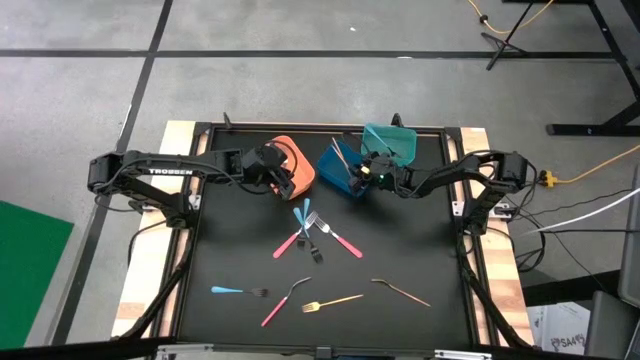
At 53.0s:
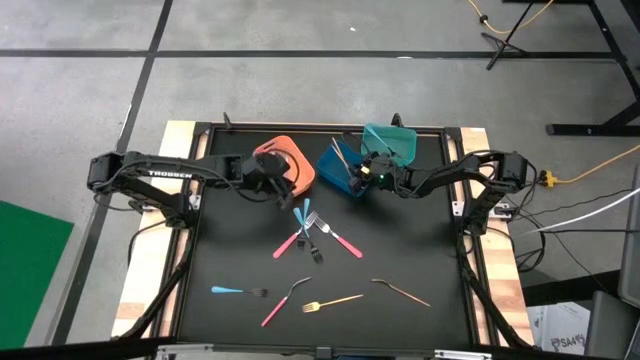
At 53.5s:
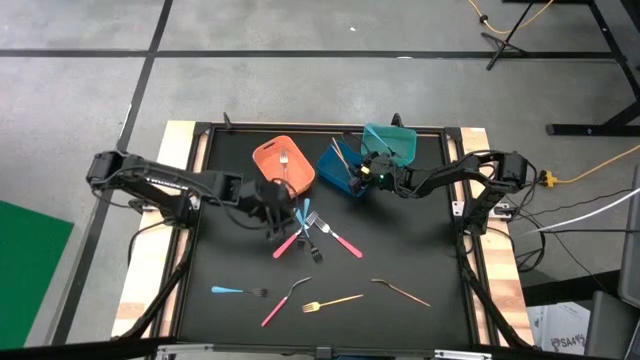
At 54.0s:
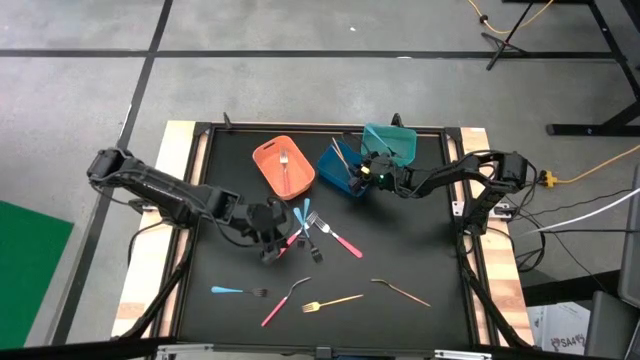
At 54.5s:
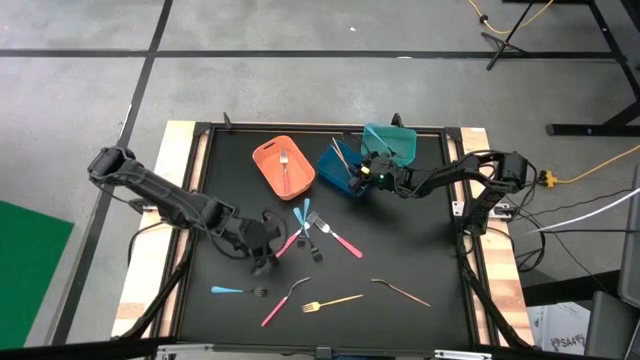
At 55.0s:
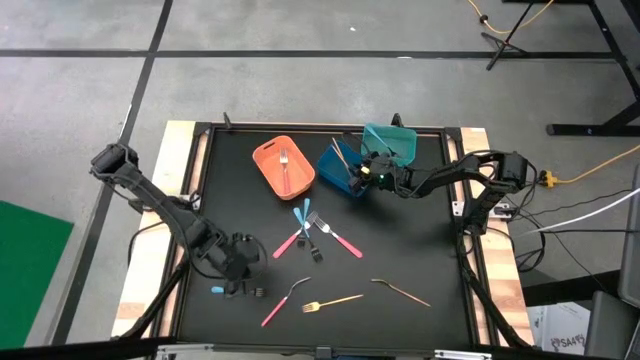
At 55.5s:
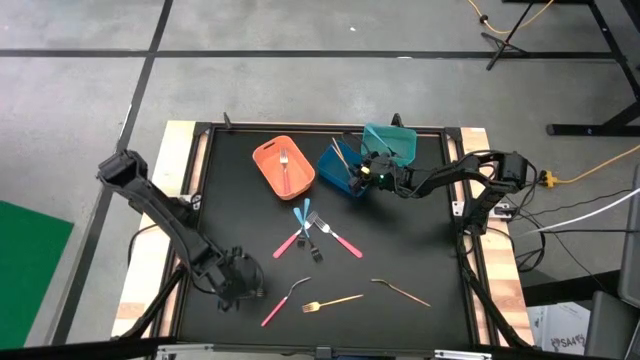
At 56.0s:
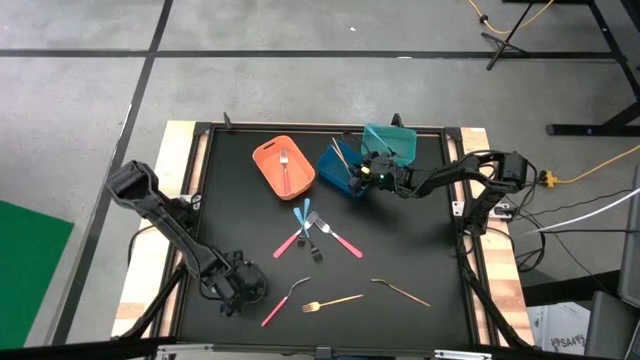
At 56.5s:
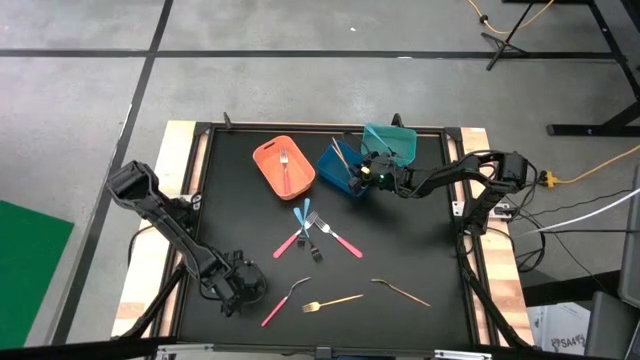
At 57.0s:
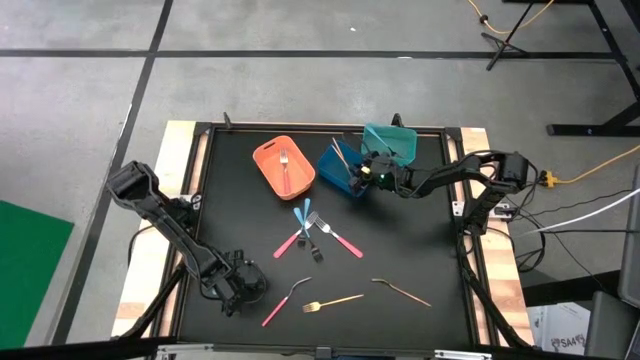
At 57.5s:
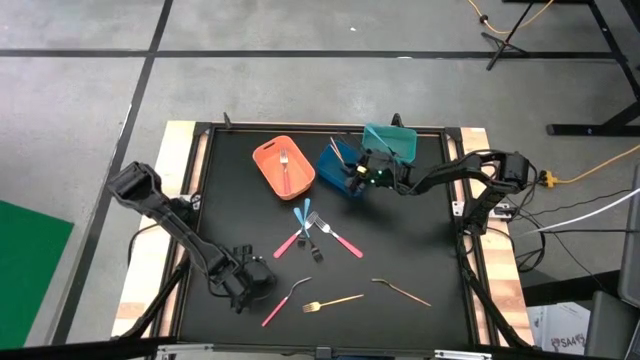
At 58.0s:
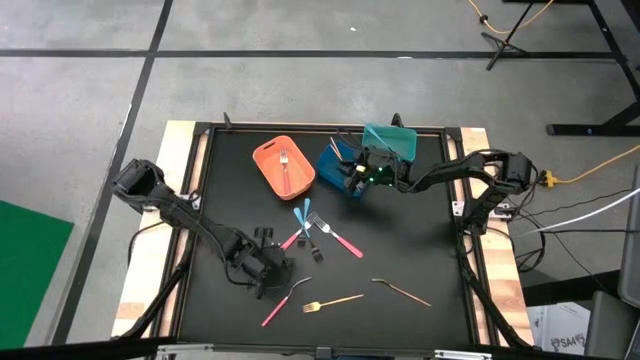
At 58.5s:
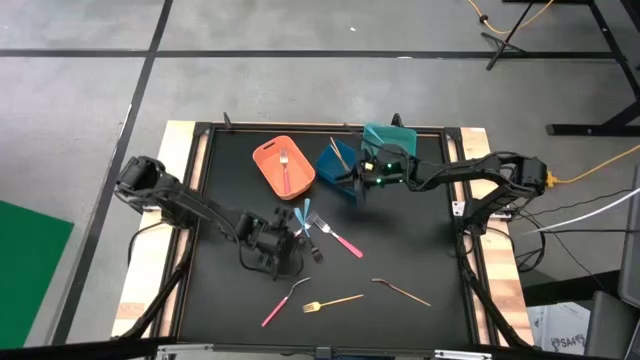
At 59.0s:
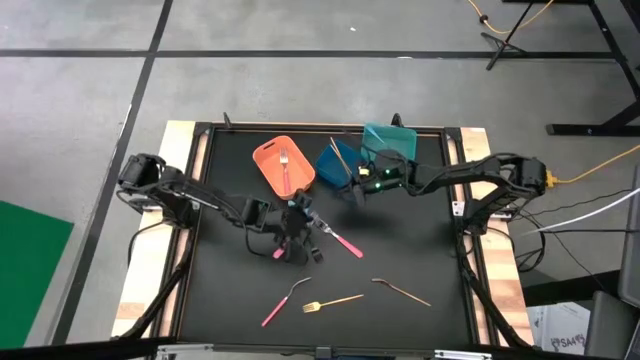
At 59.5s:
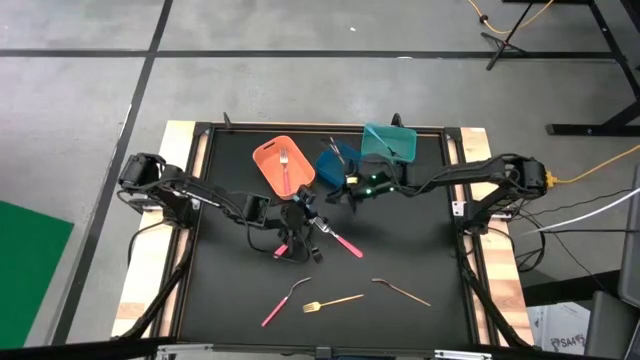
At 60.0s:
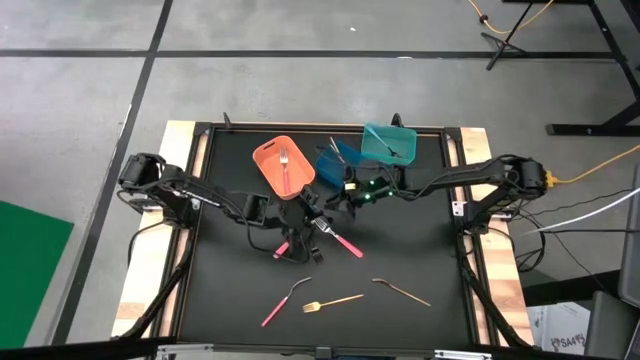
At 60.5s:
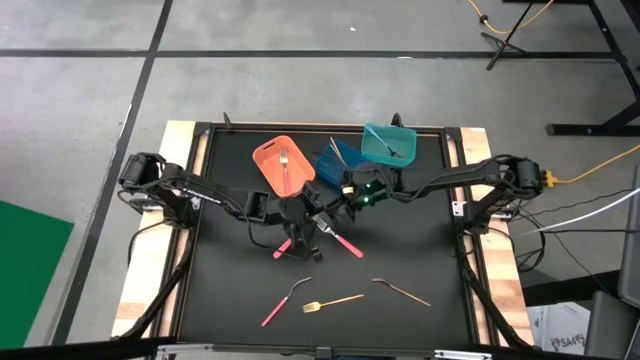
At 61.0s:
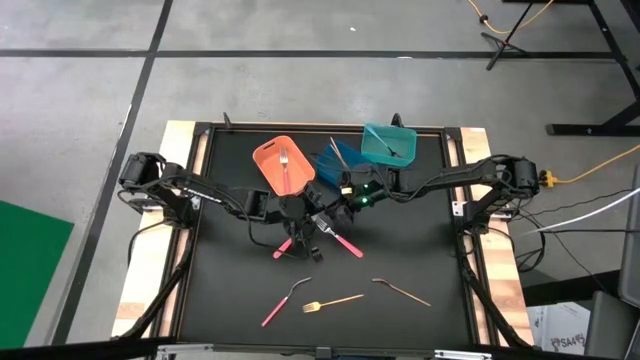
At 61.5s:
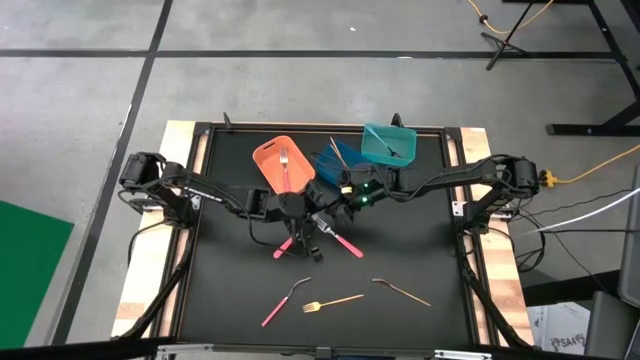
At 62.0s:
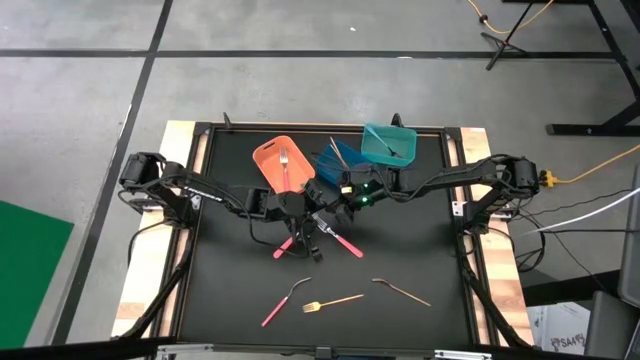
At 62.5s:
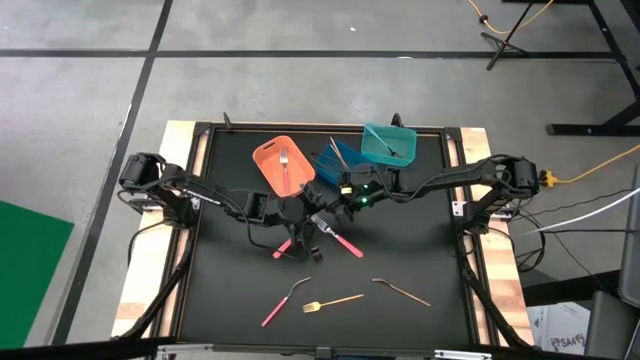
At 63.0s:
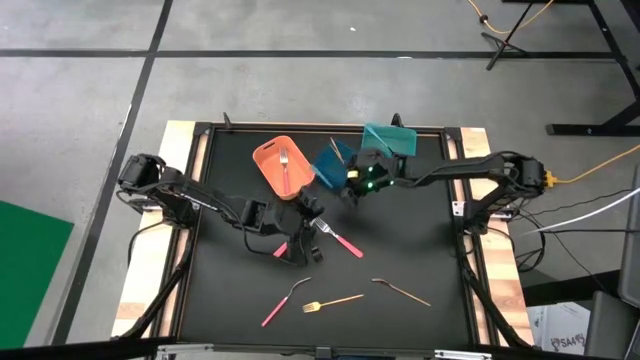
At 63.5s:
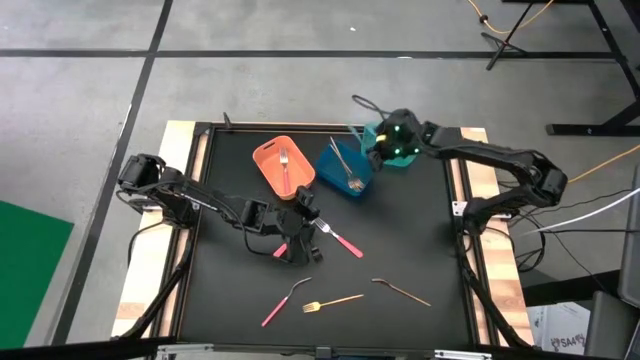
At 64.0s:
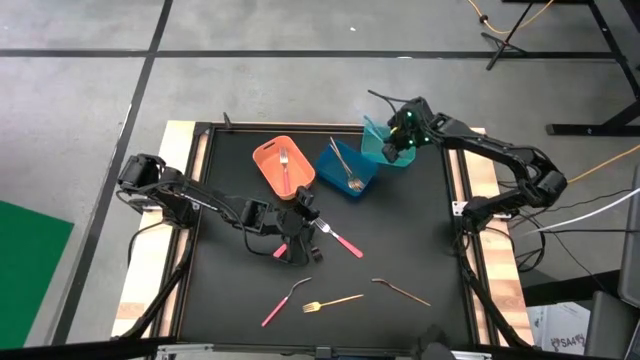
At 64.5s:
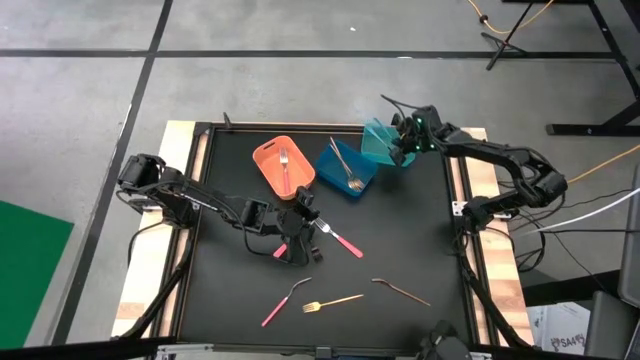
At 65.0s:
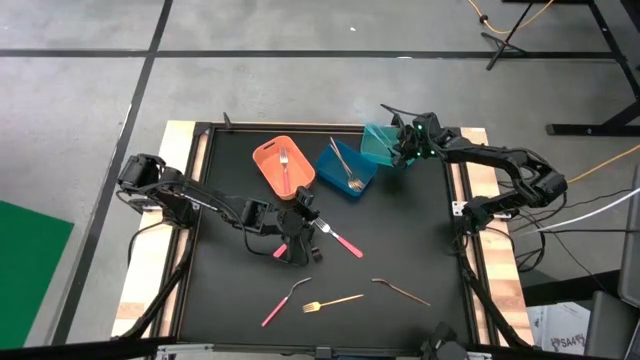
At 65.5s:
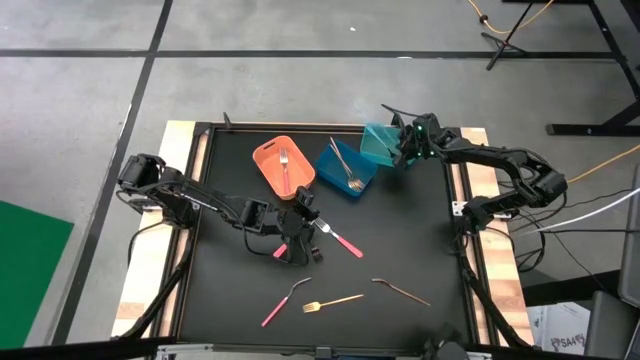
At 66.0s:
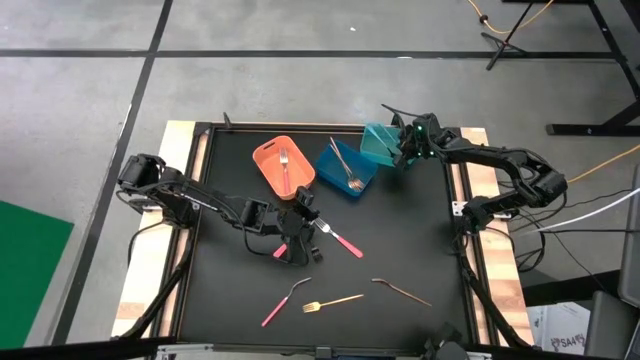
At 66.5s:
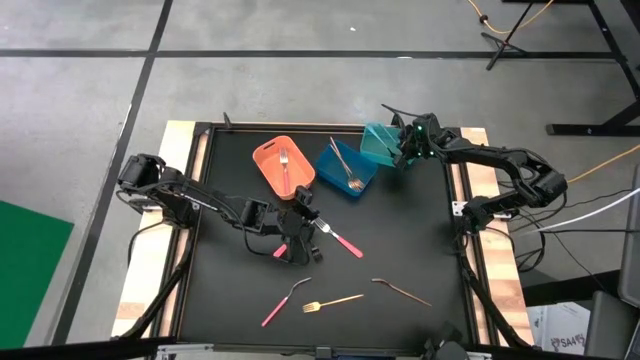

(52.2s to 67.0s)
Task: Sort silverware by color (type)
Put the blue fork into the green bin

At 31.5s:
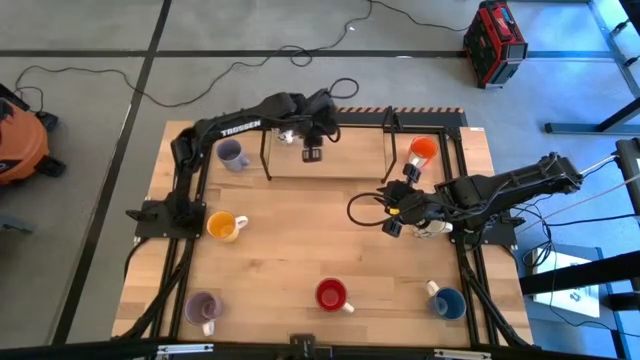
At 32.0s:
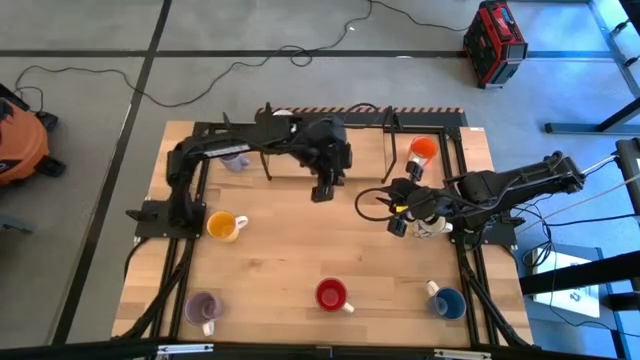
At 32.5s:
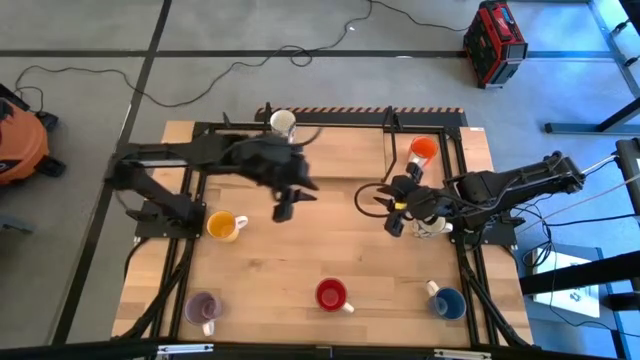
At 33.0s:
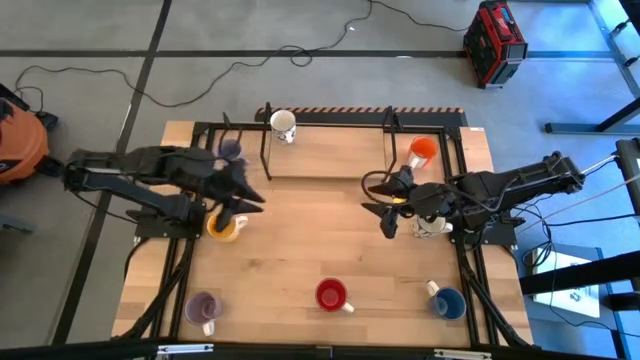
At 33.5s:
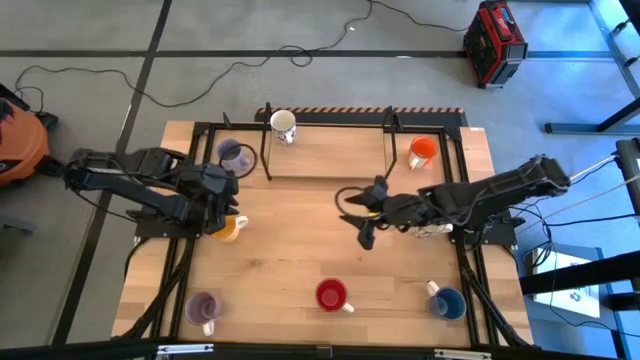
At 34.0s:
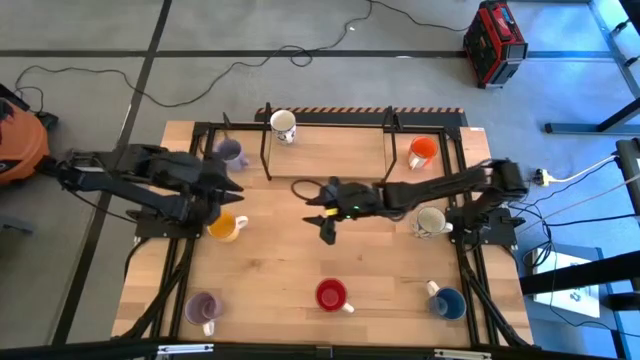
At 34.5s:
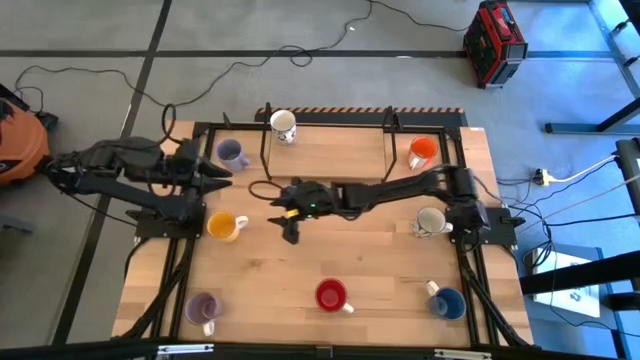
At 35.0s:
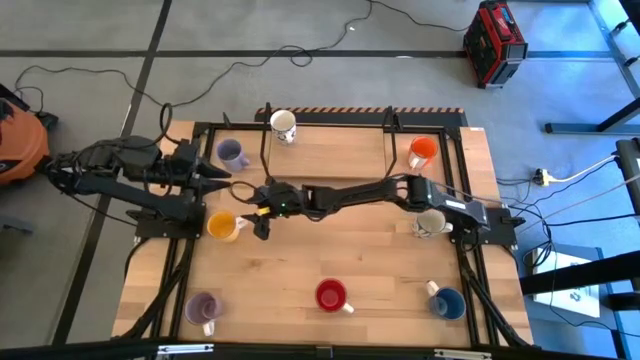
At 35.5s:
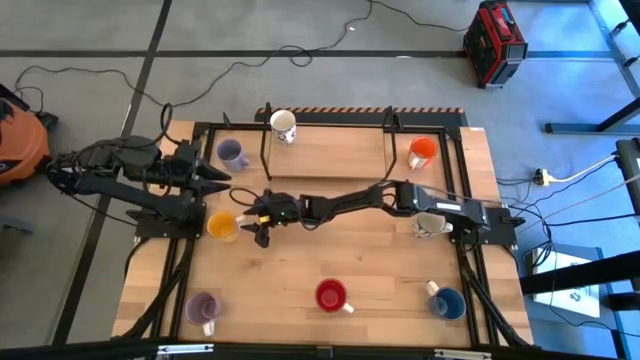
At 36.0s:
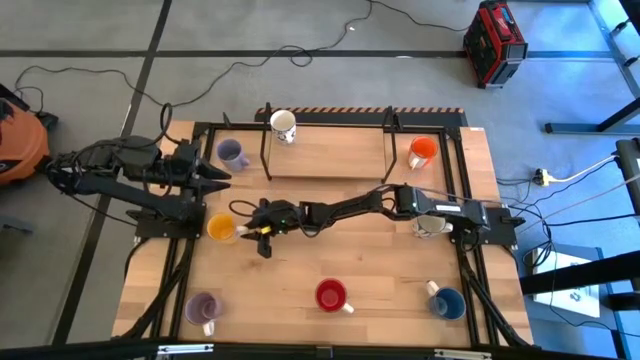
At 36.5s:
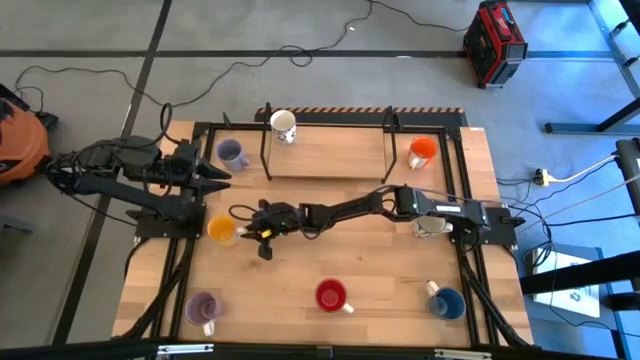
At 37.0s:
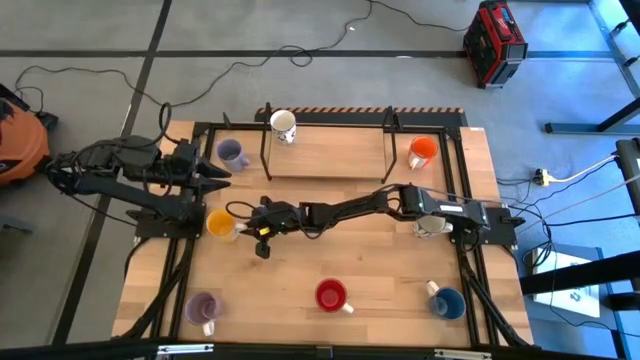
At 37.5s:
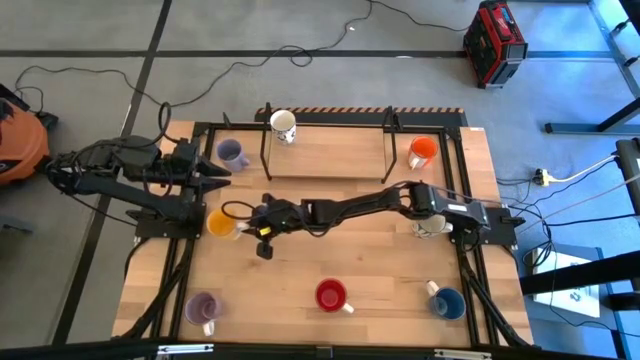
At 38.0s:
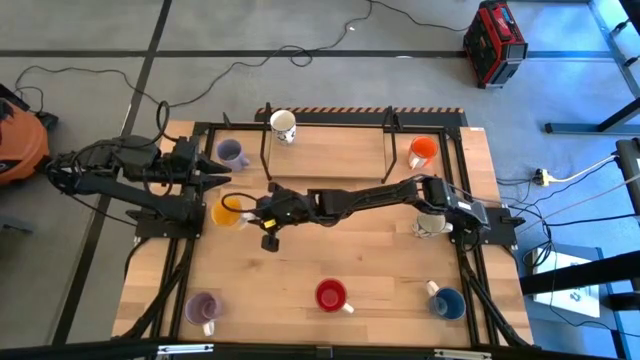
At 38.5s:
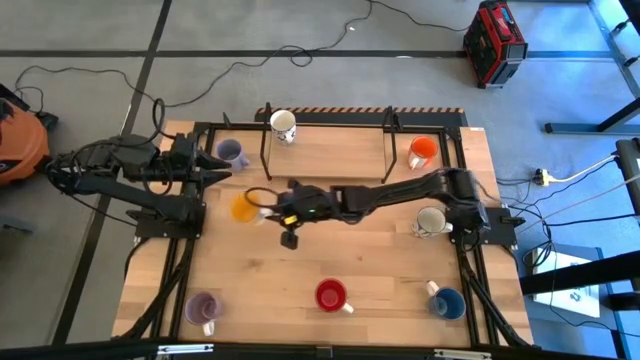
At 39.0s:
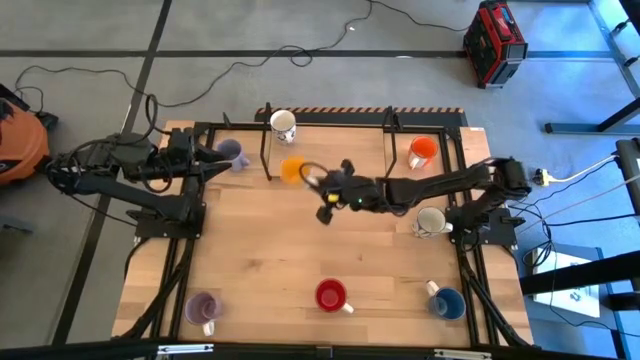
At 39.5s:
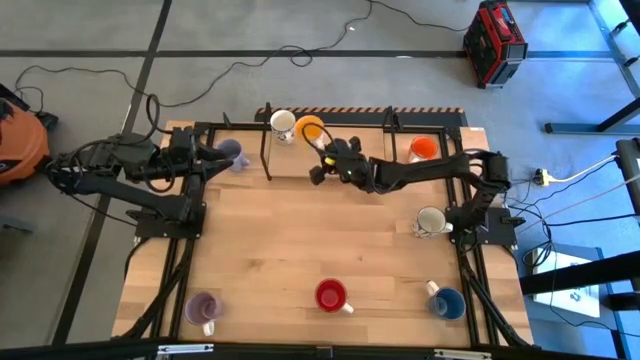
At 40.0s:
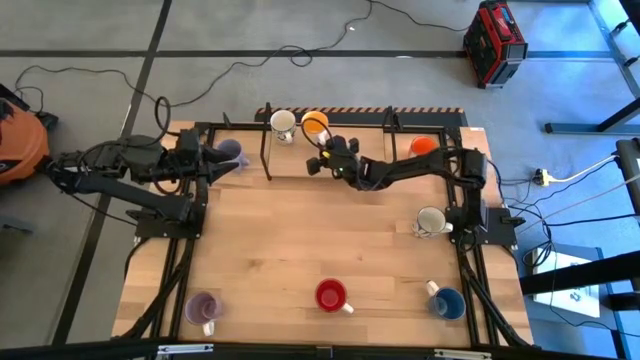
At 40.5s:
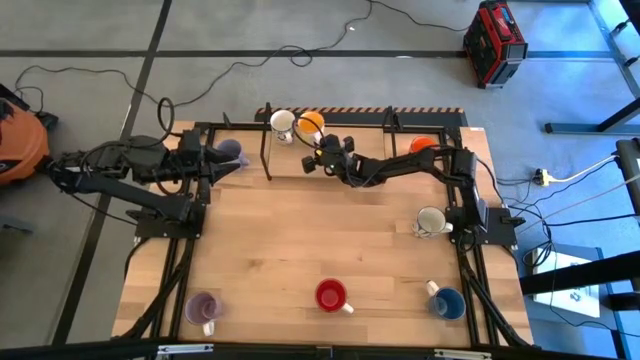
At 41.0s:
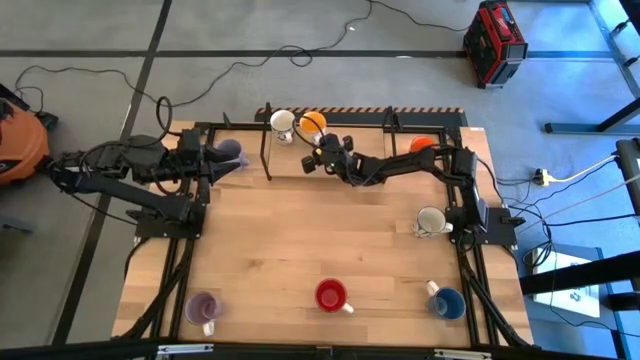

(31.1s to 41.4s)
Task: Place coffee mugs
Put the yellow mug on the shelf
